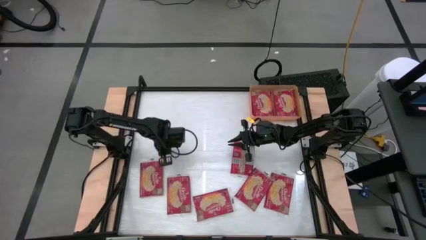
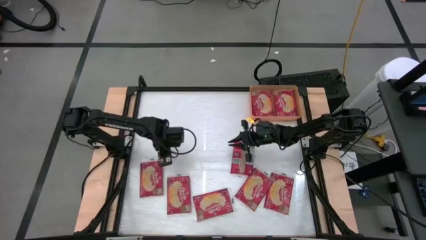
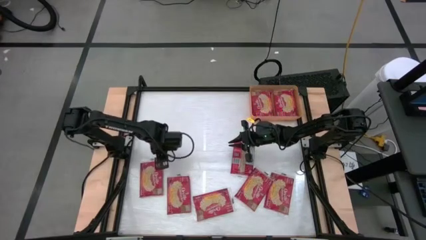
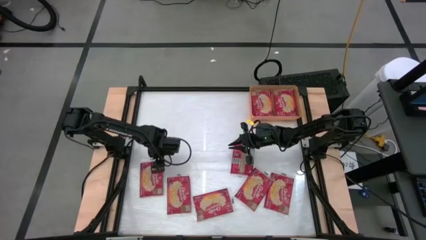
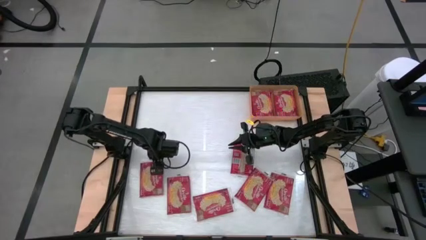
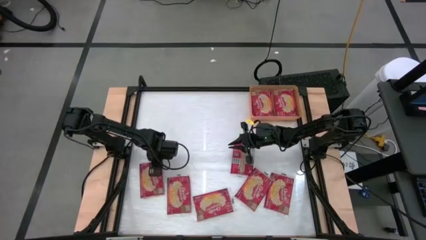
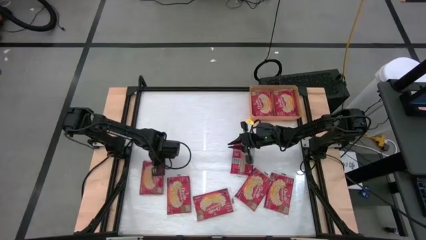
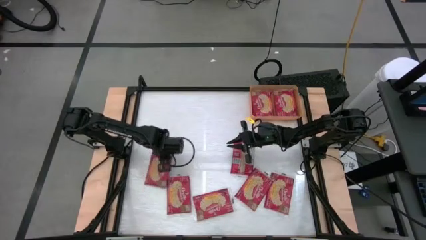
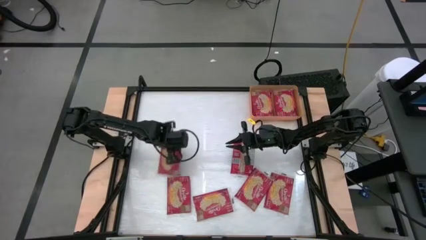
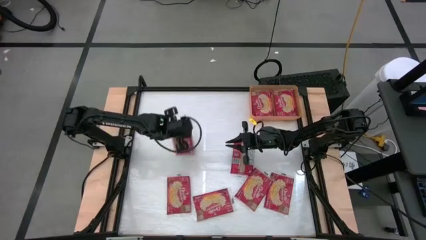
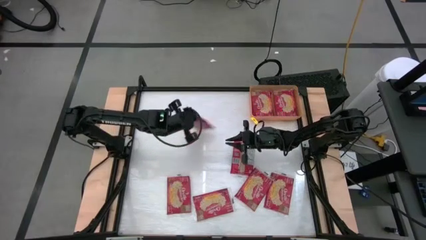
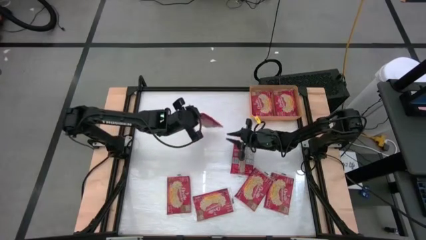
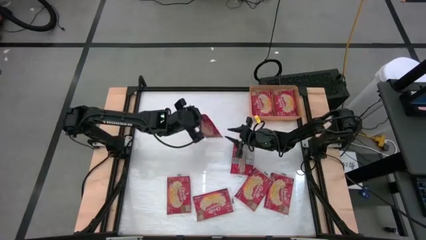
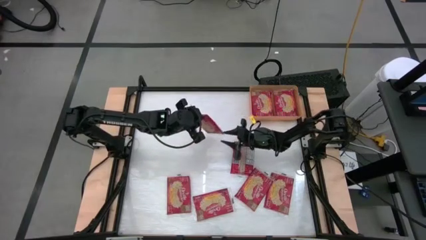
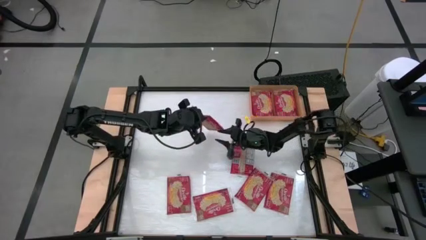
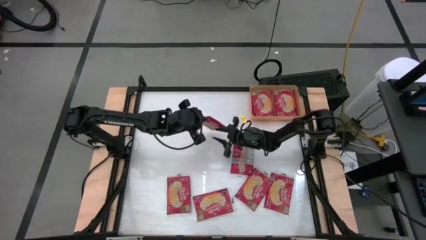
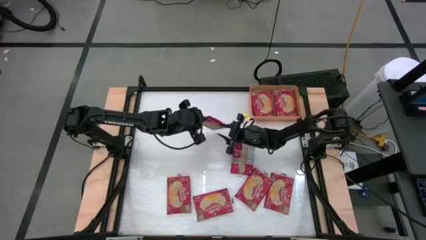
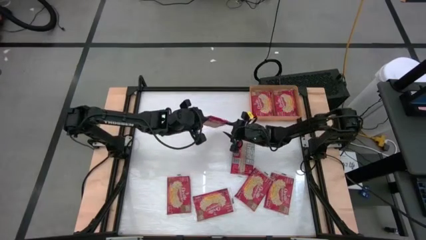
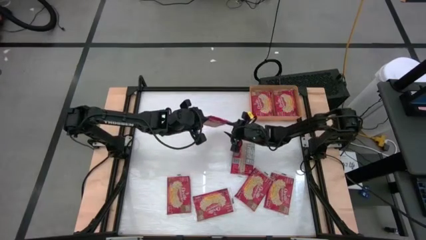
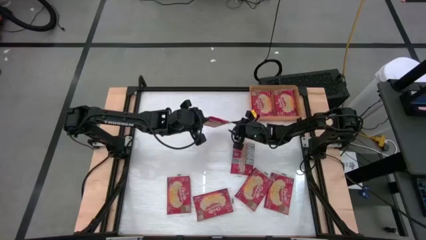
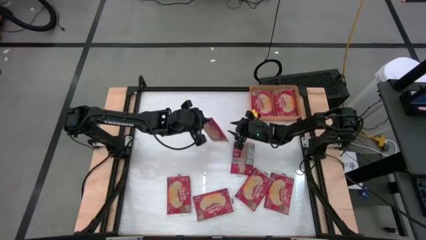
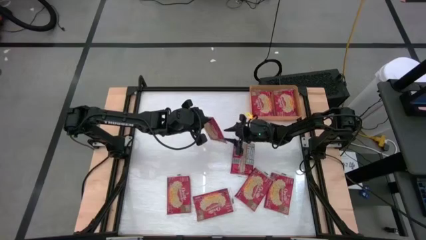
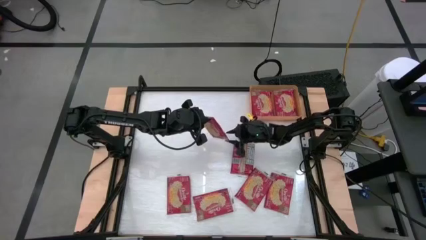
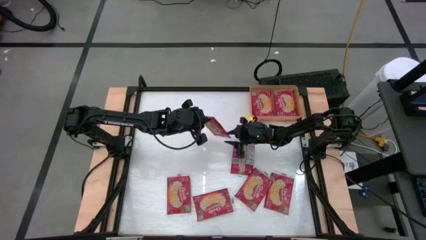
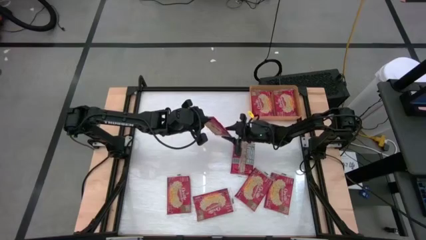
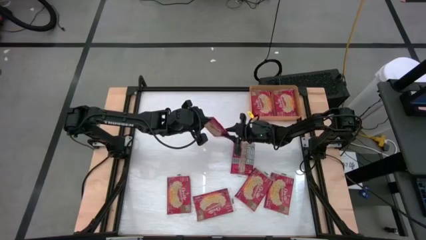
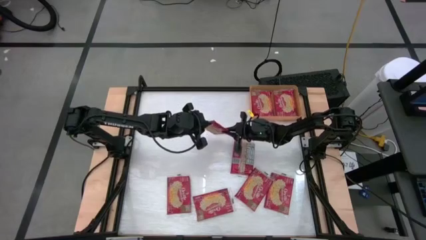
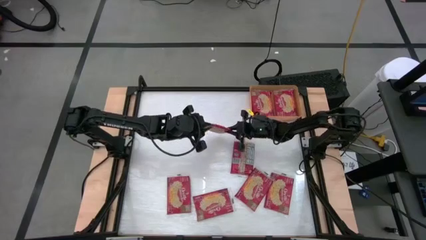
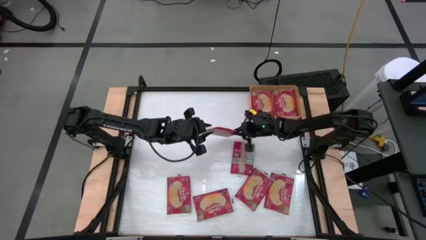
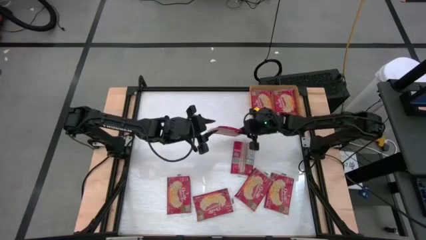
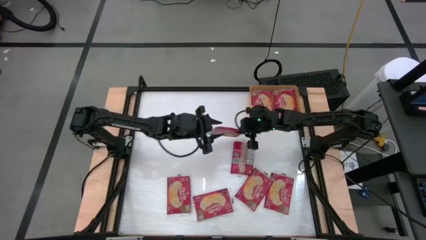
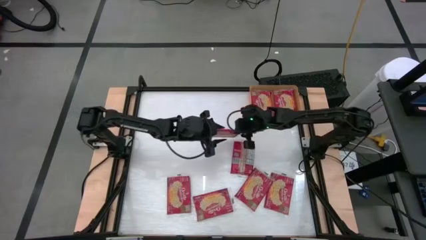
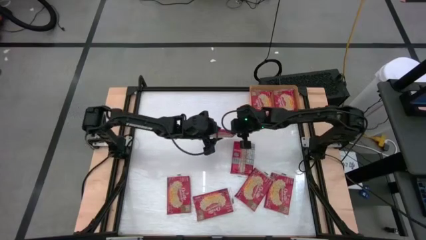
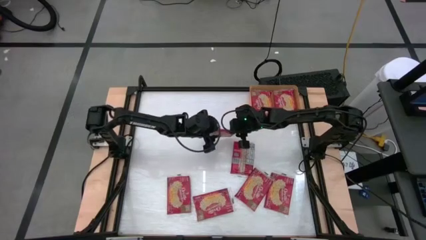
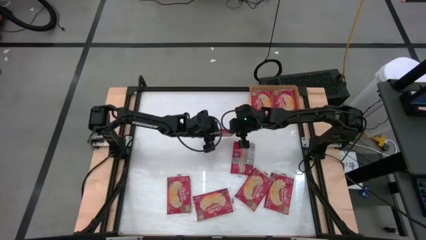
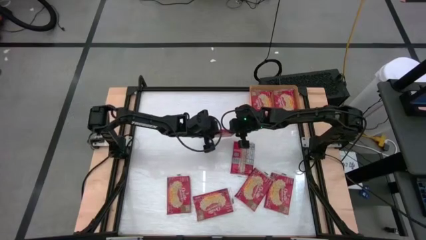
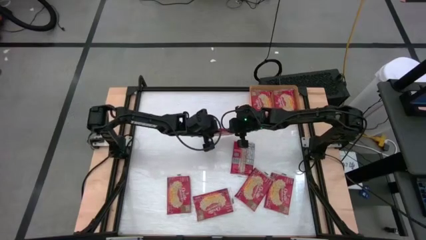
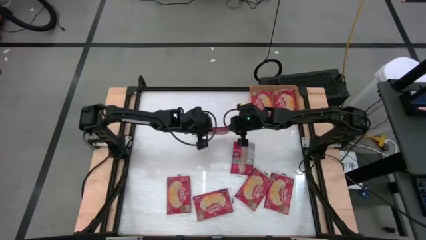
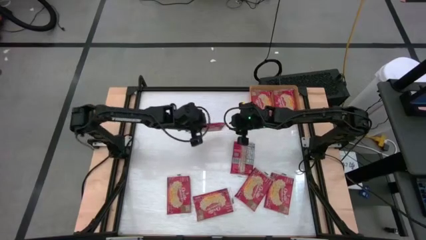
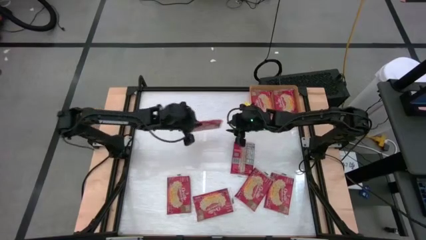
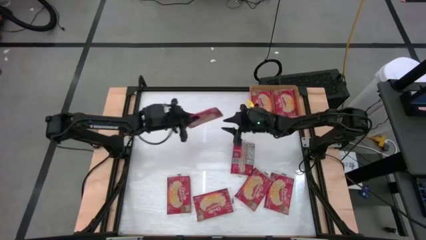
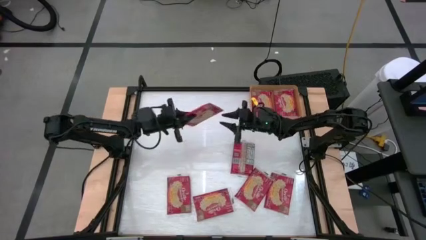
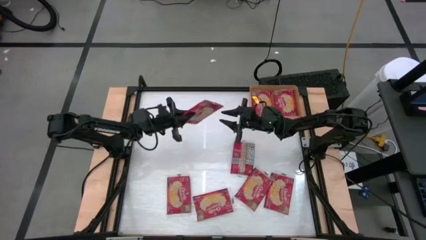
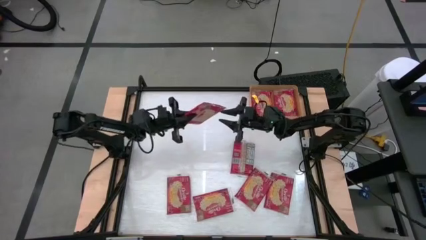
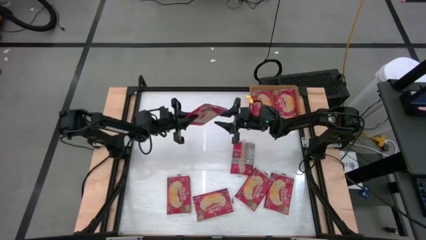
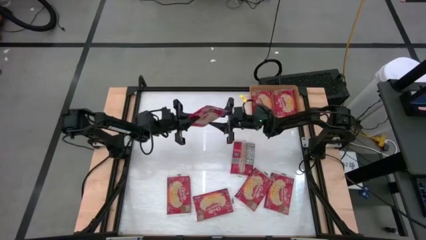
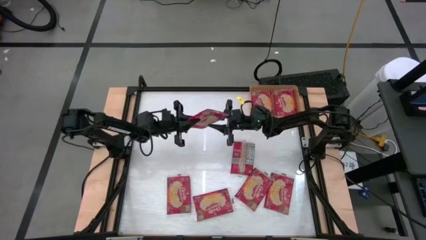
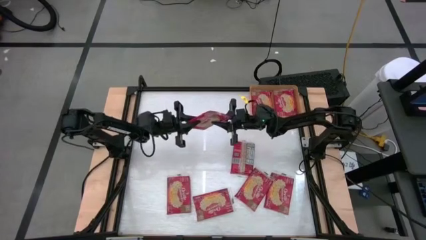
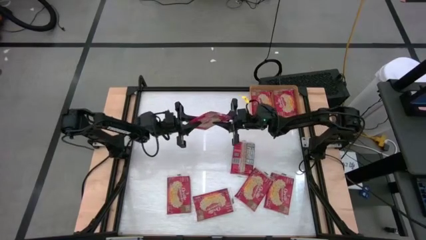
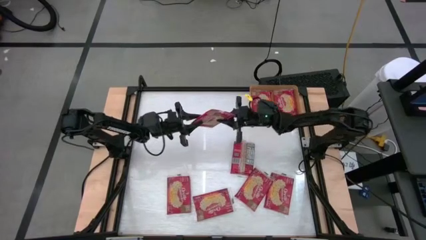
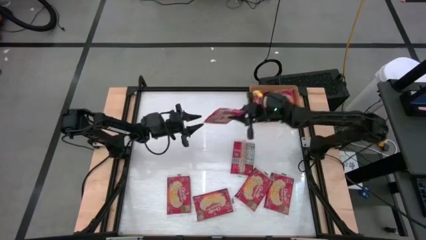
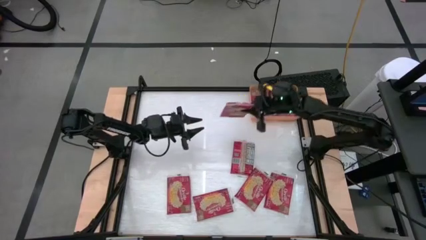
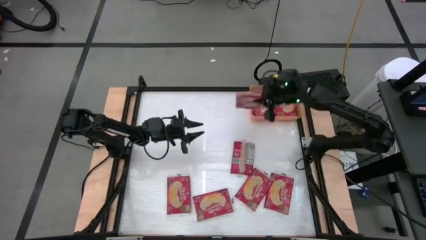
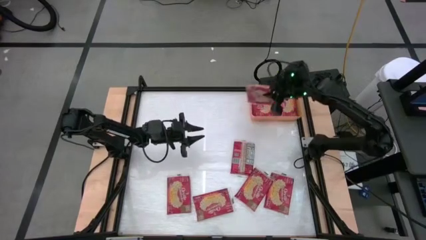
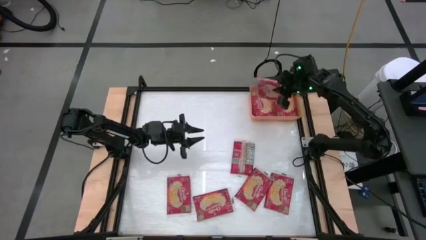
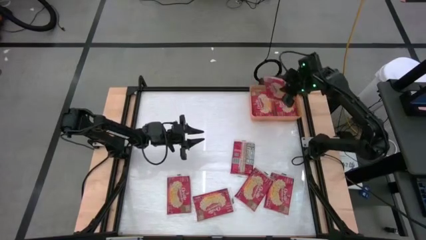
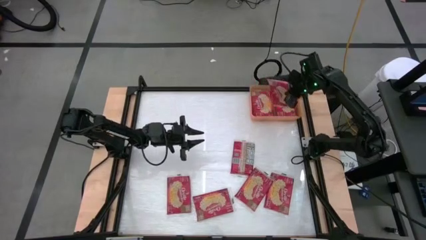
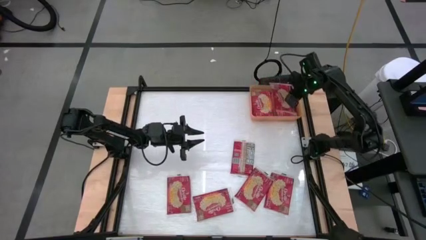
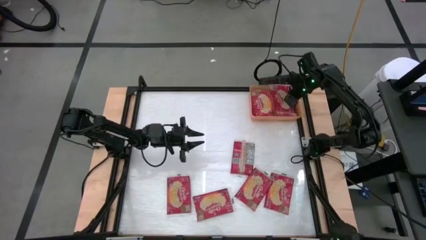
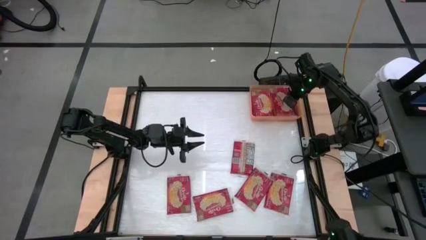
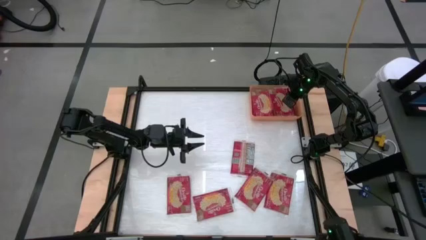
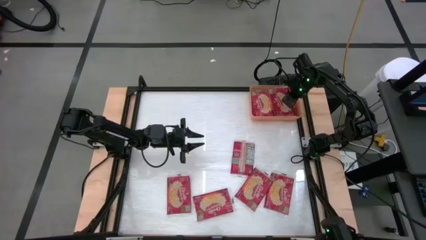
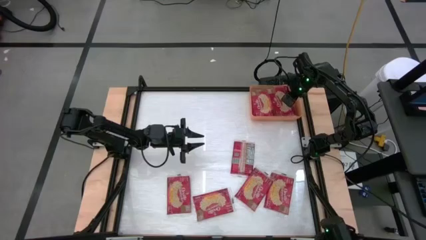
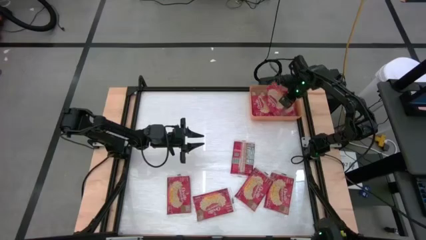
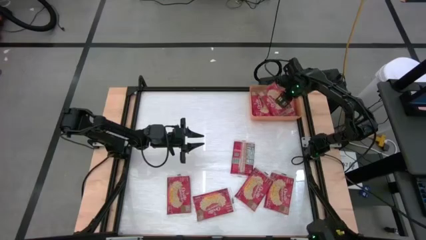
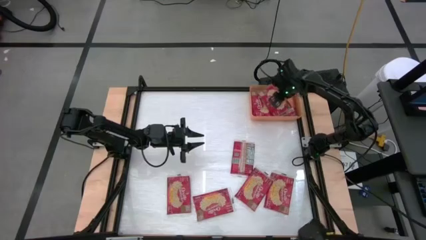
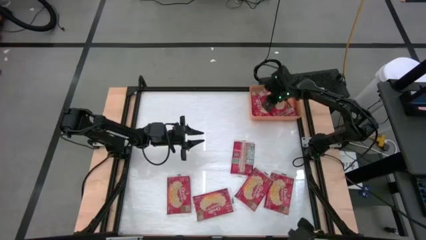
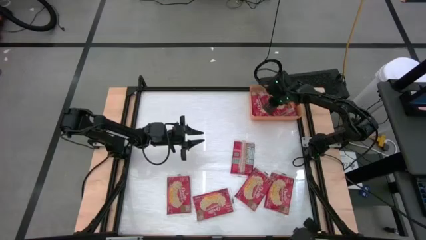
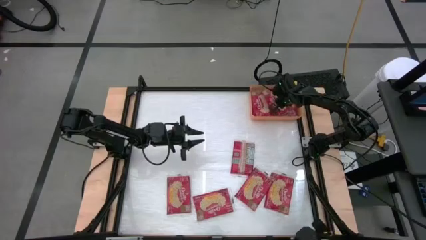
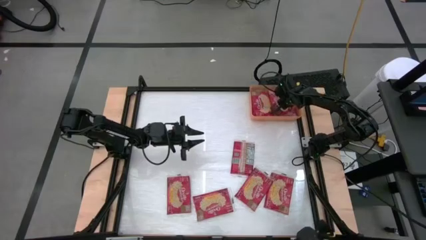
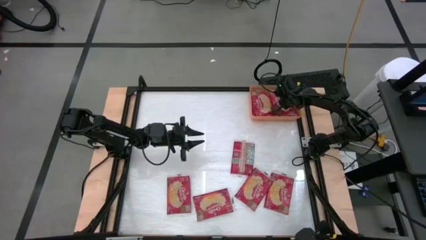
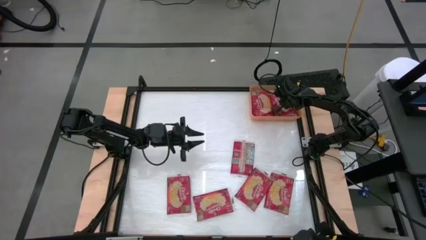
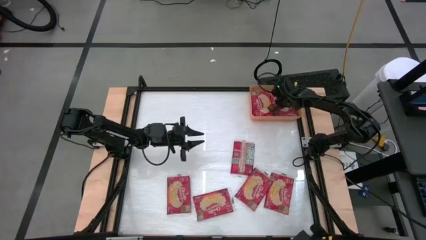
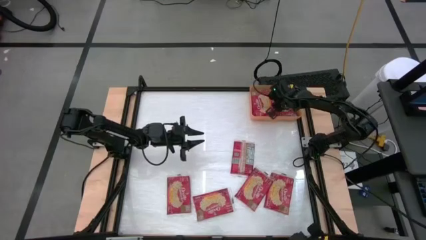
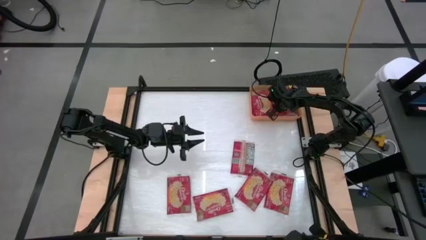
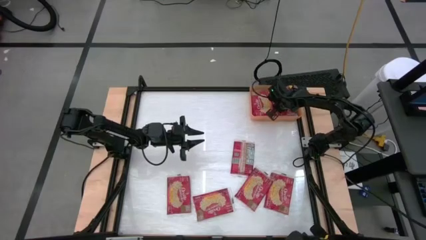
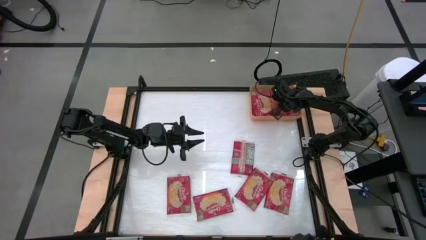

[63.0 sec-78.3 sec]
Task: Sort popcorn bags into baskets
Put the red popcorn bag into the orange bin
